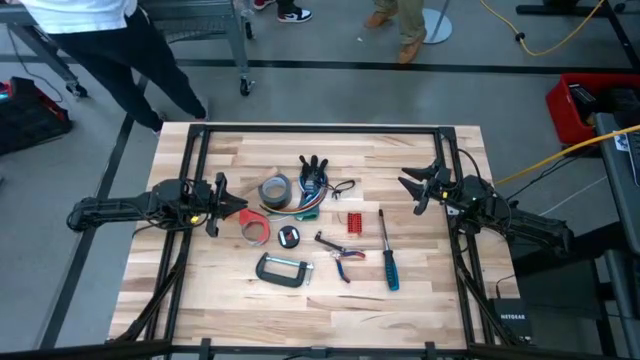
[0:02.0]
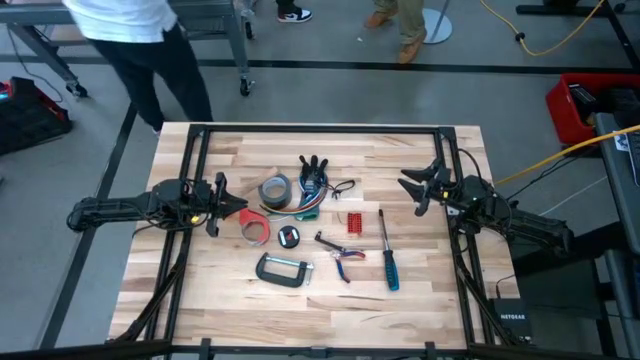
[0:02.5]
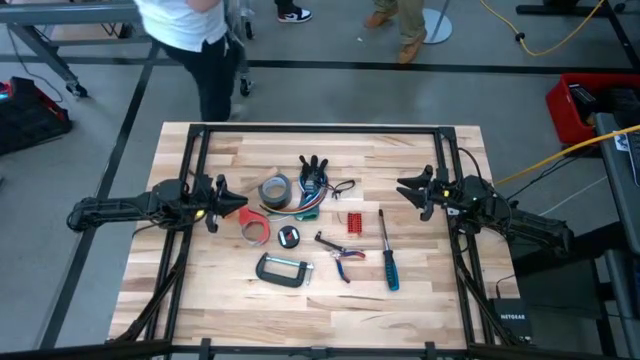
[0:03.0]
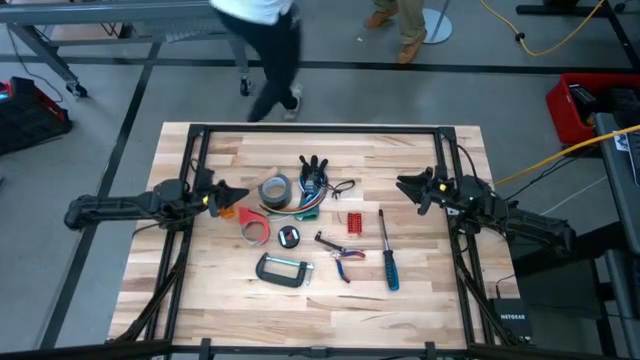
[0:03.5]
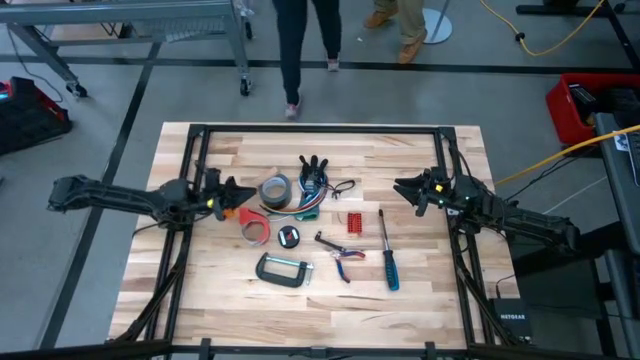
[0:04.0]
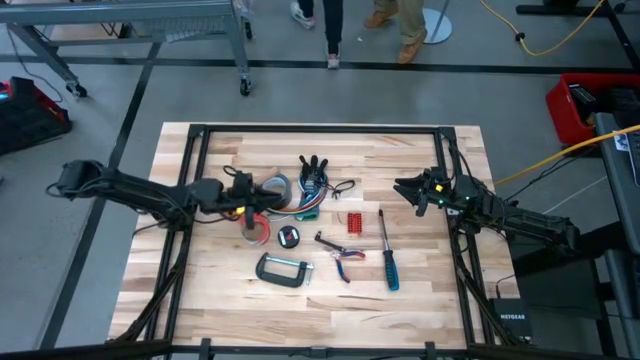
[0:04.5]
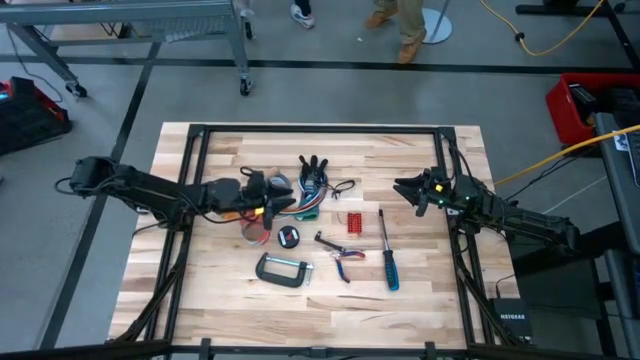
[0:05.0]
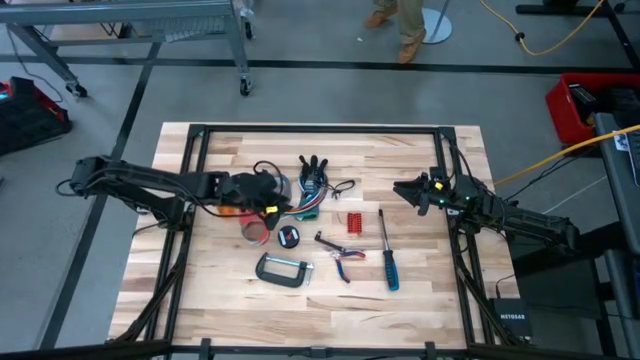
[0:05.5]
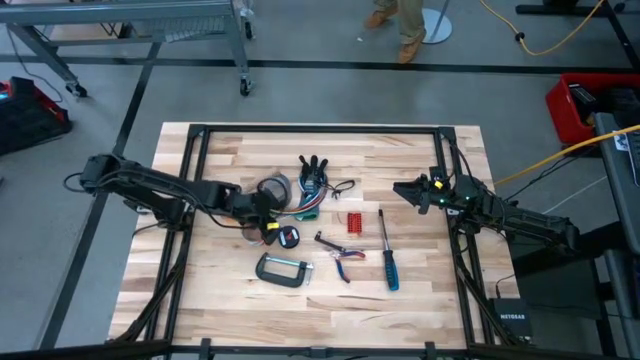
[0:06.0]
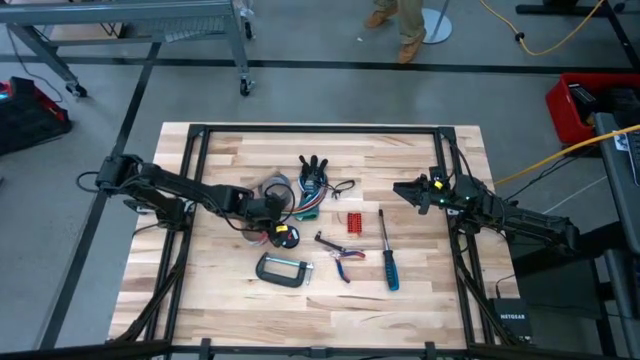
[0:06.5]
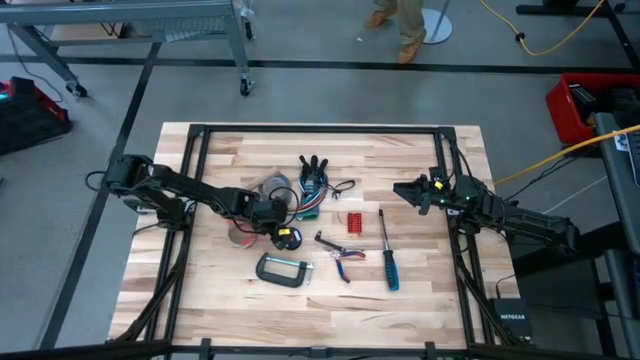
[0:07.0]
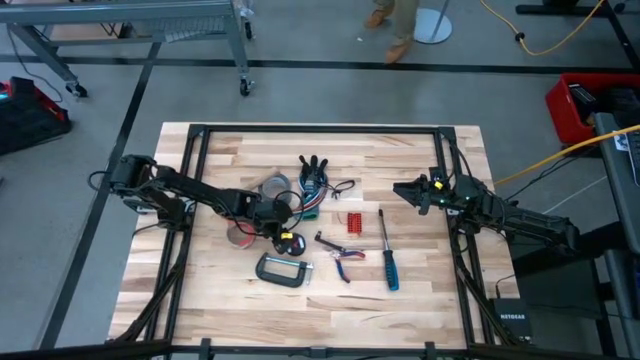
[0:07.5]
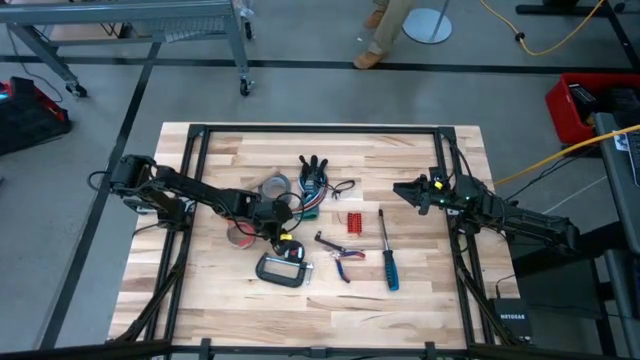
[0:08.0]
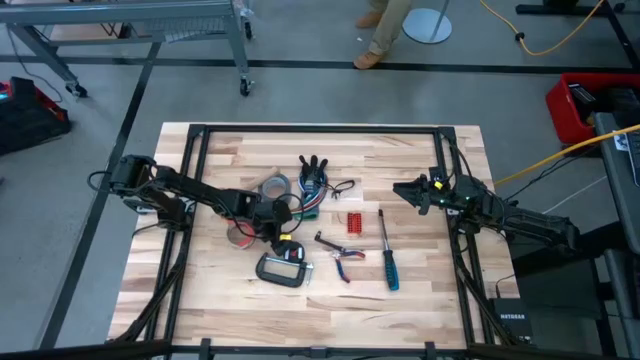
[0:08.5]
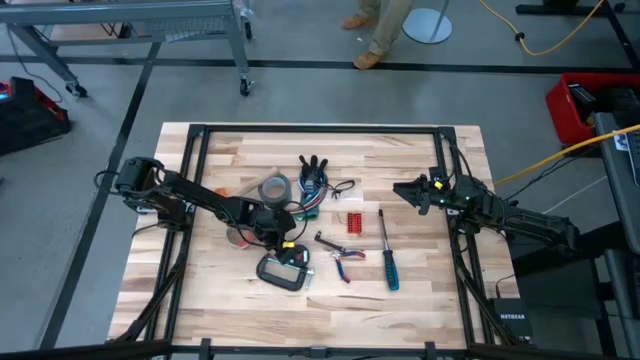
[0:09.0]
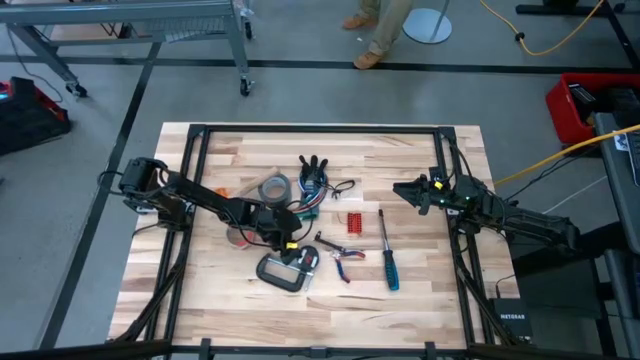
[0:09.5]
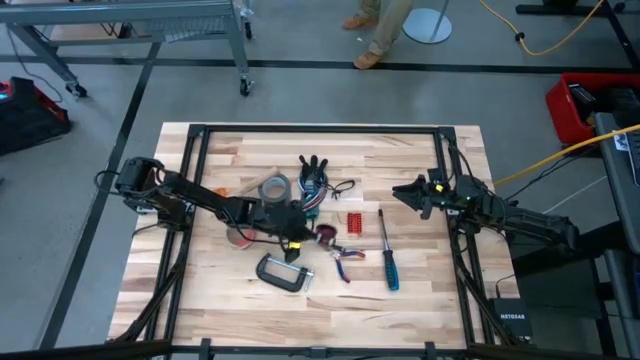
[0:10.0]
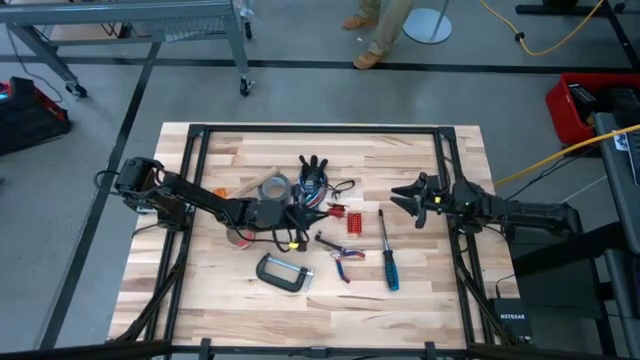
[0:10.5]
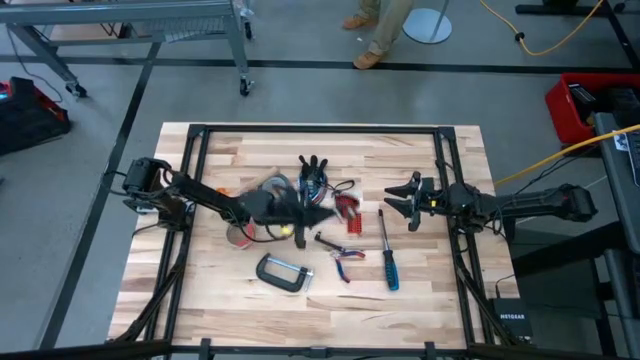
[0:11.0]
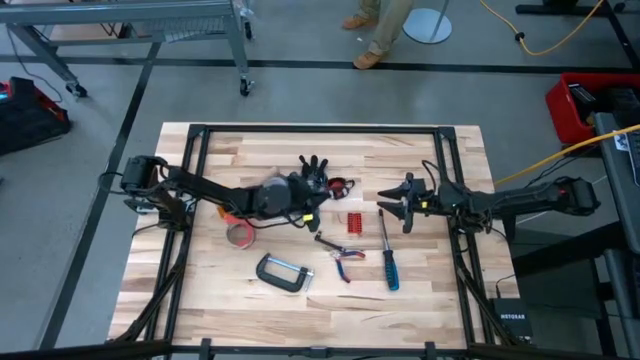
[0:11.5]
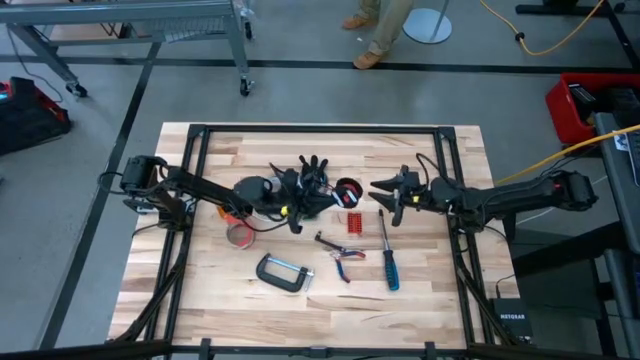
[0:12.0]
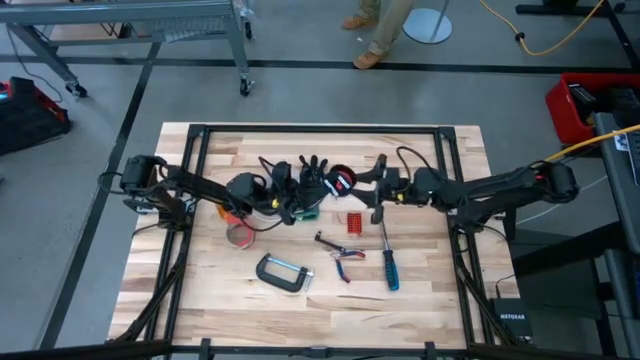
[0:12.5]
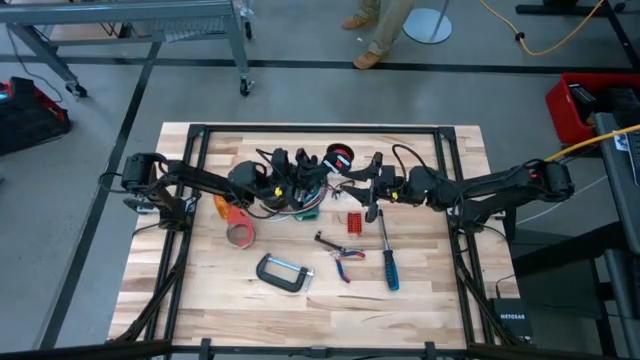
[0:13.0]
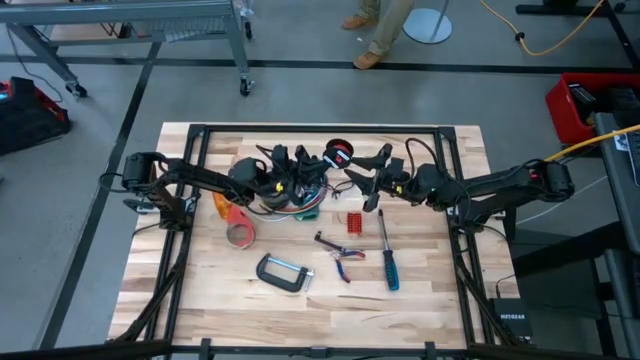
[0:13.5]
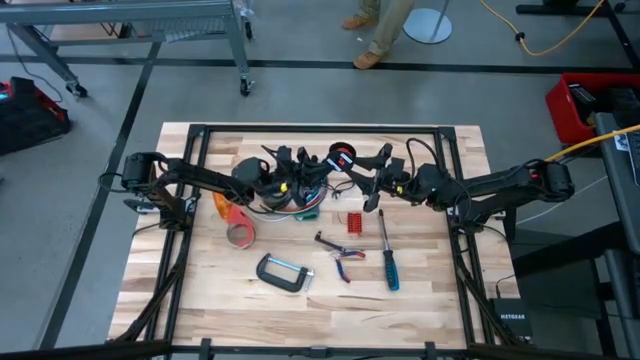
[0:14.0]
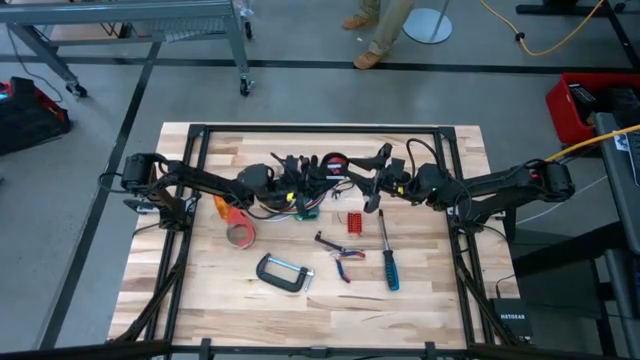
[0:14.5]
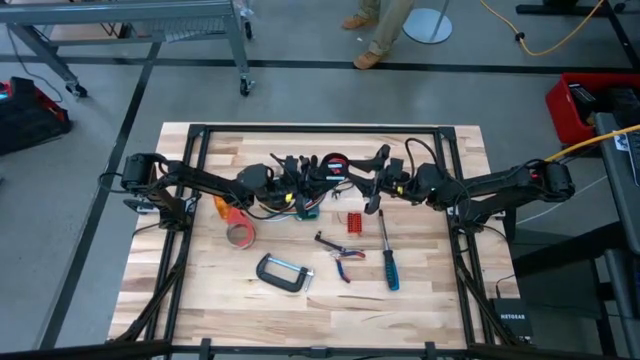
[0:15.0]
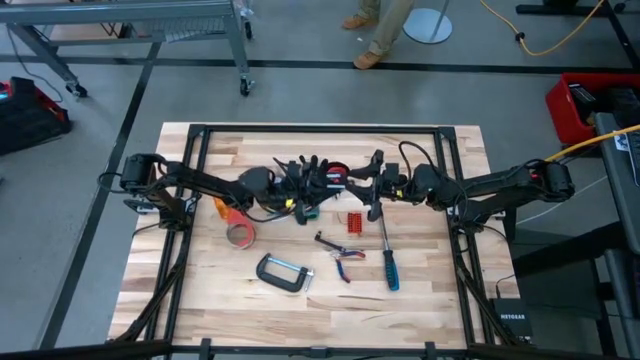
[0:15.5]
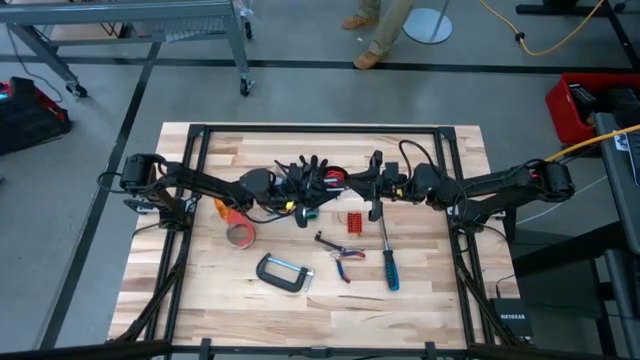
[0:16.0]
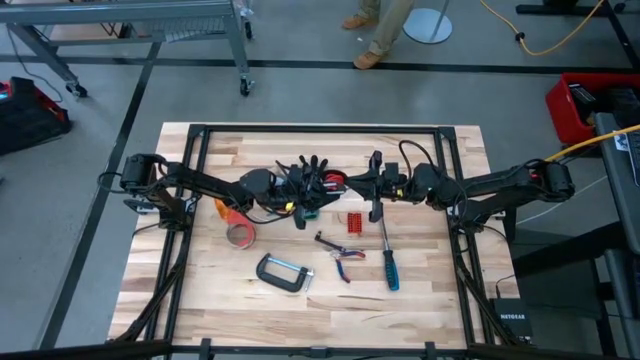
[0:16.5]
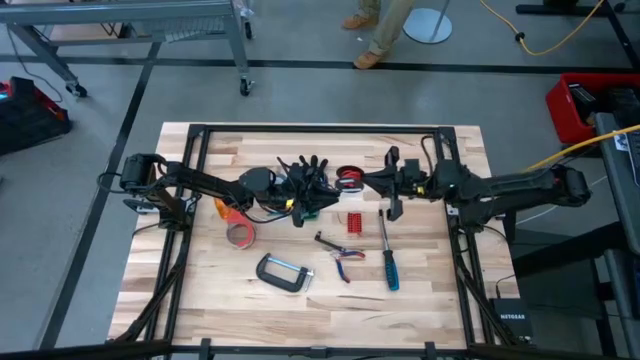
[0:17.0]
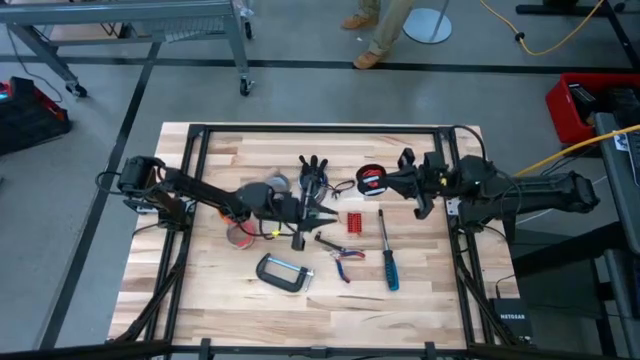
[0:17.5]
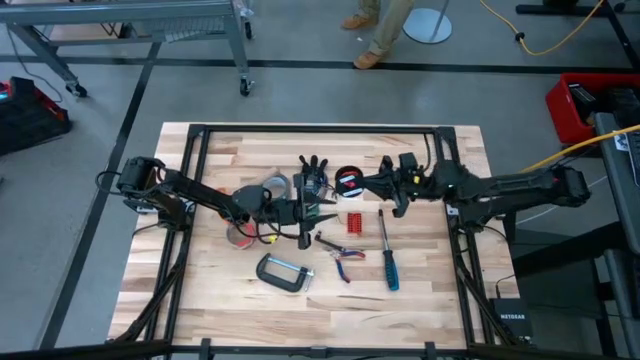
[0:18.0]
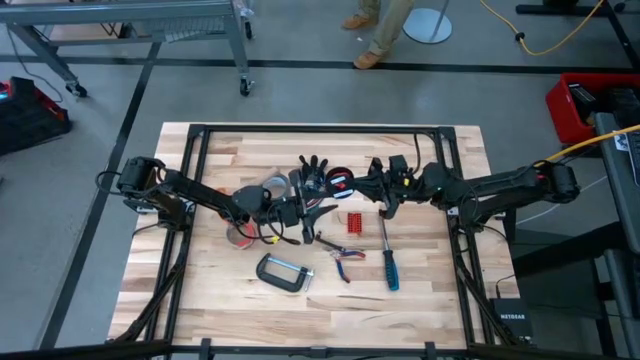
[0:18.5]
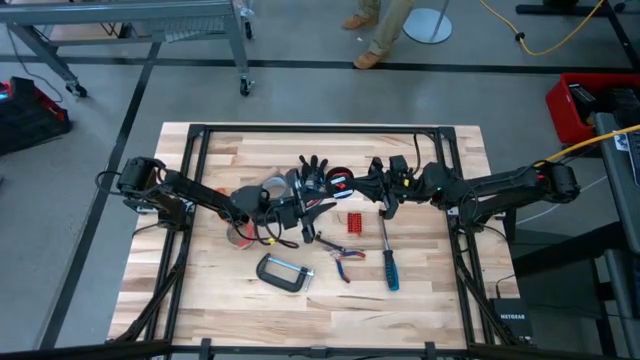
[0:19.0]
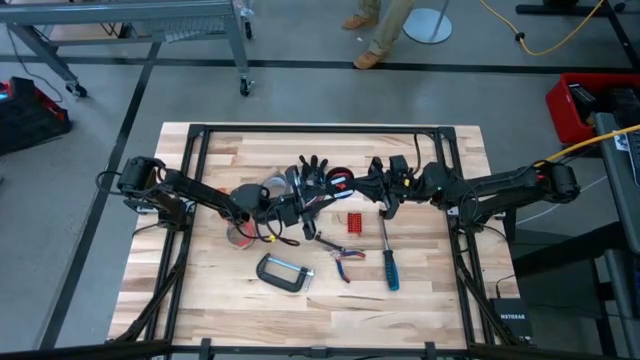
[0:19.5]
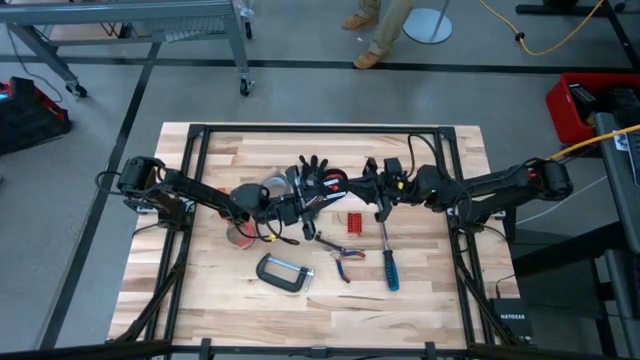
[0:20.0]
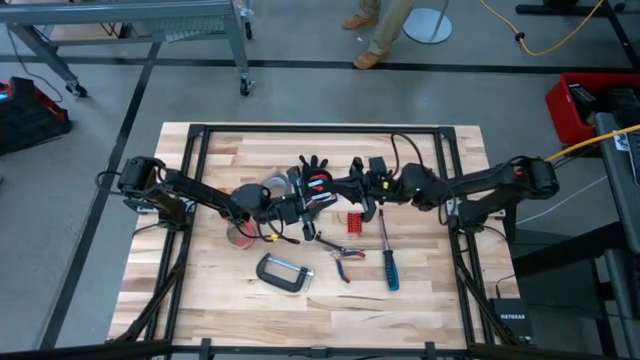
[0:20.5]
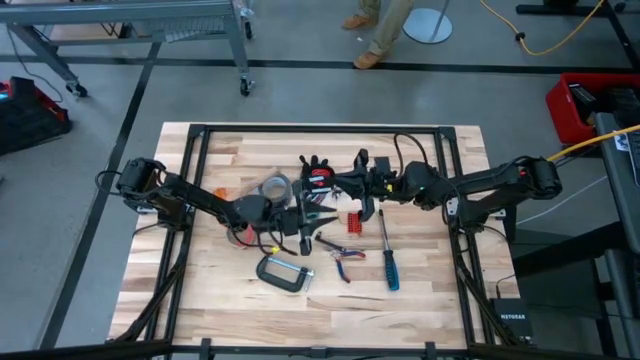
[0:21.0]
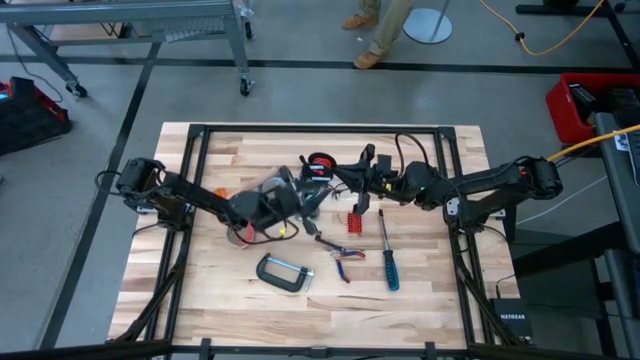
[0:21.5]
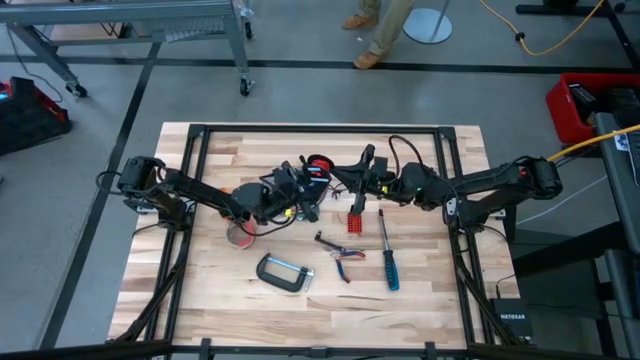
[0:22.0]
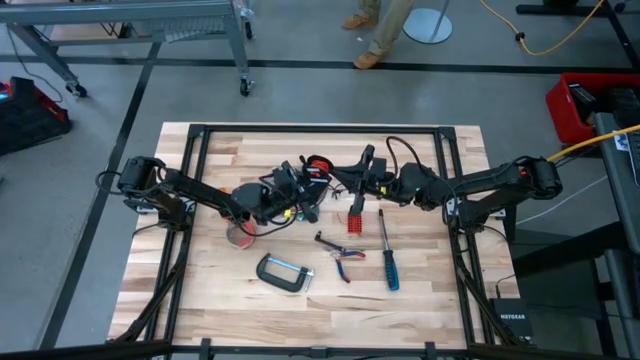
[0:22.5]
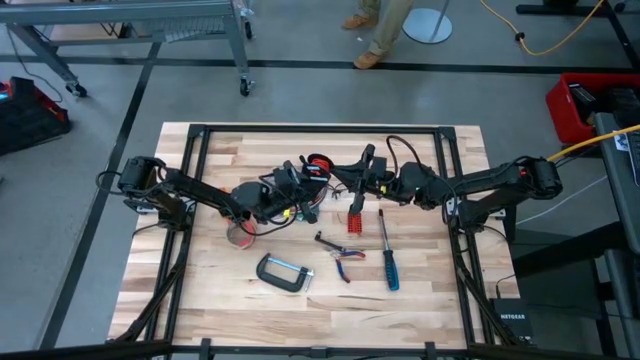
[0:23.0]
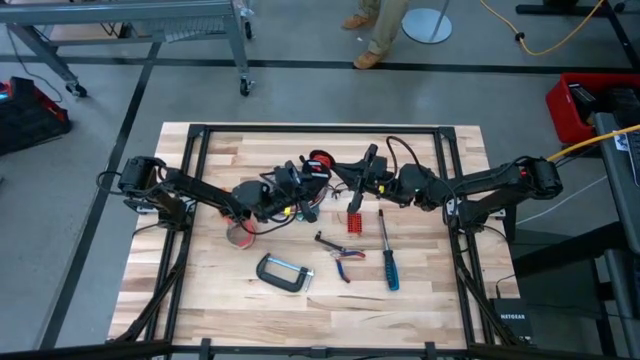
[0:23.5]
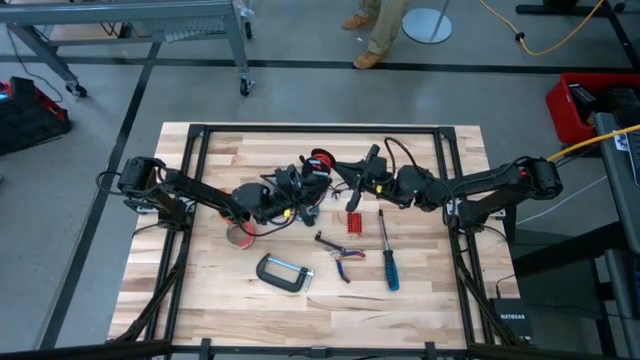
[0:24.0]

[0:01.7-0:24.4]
Task: Coil cords
Uncoil the red wire from the black spool
